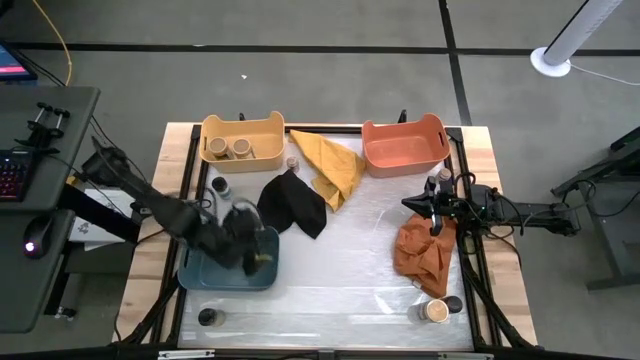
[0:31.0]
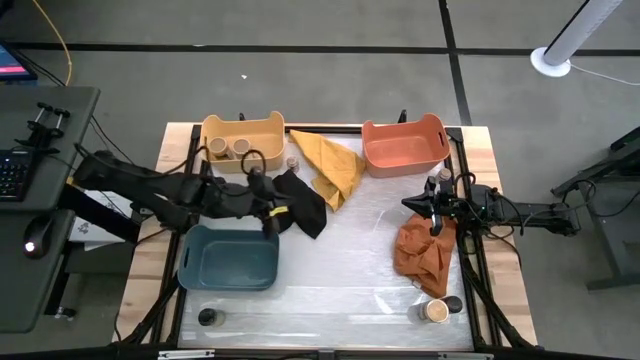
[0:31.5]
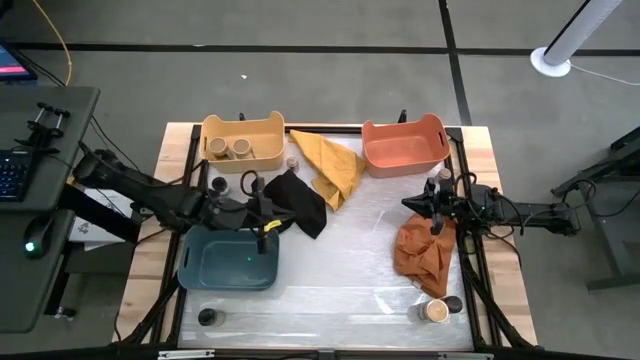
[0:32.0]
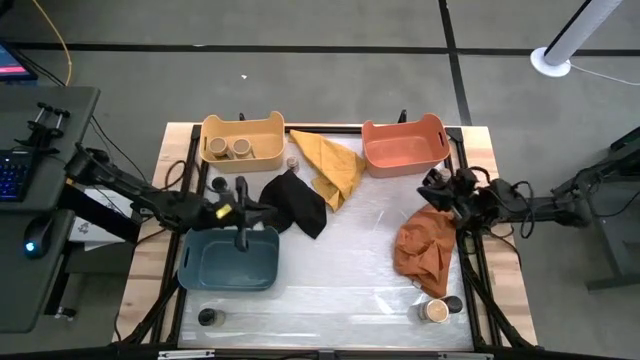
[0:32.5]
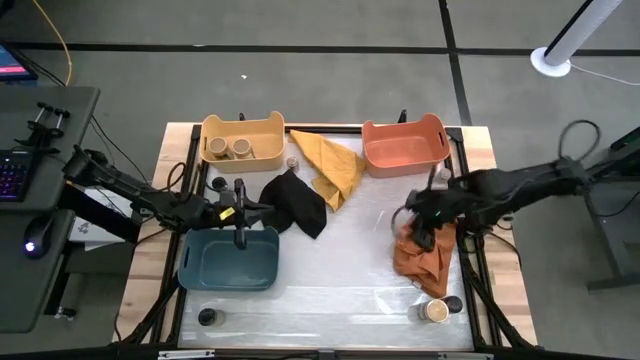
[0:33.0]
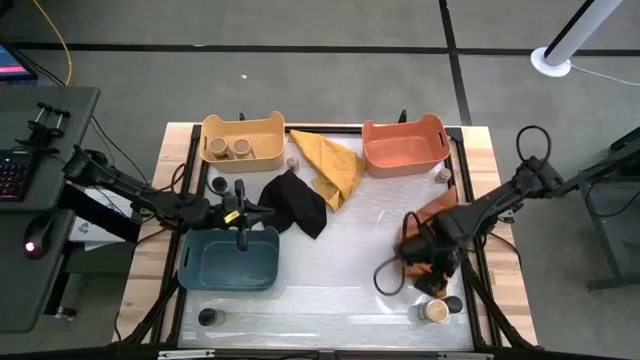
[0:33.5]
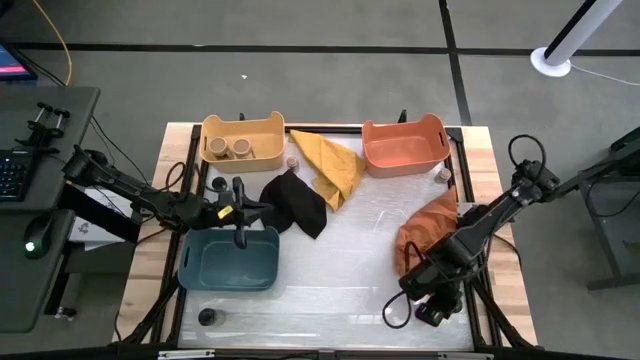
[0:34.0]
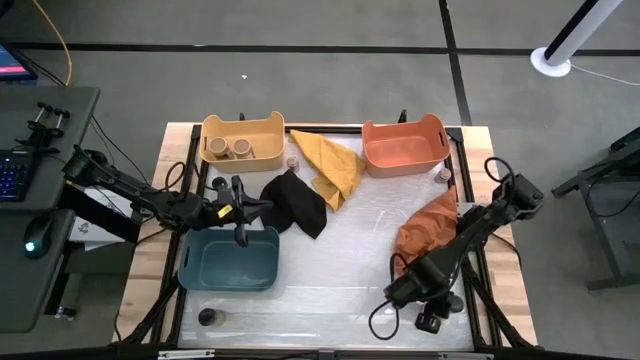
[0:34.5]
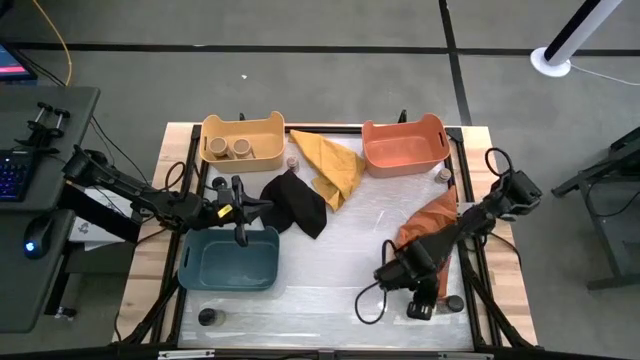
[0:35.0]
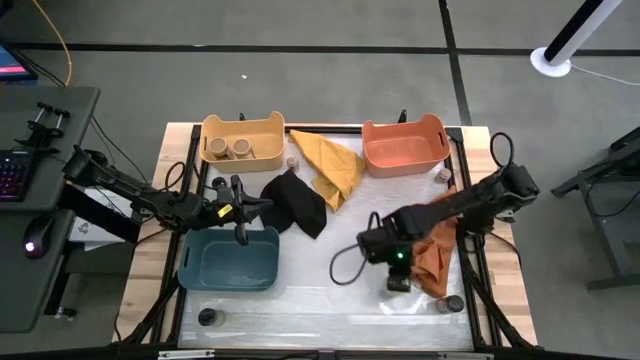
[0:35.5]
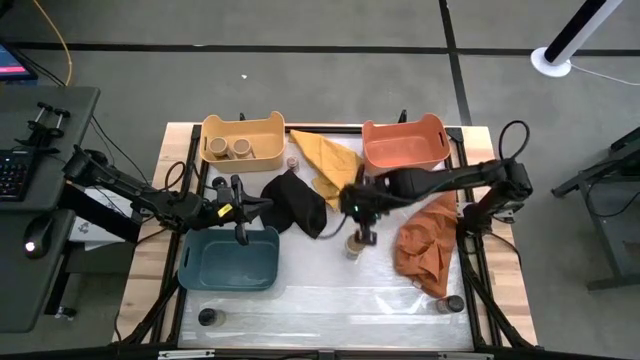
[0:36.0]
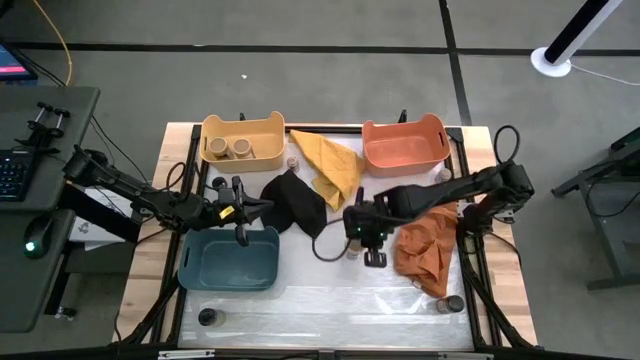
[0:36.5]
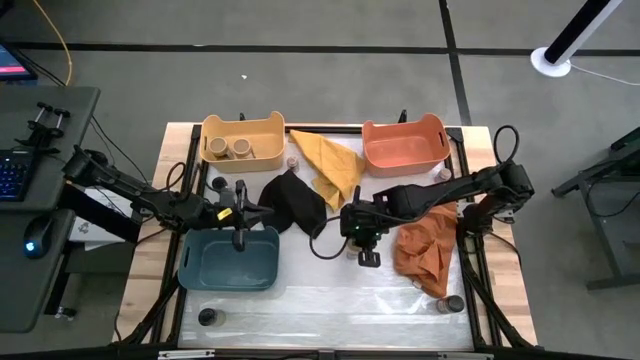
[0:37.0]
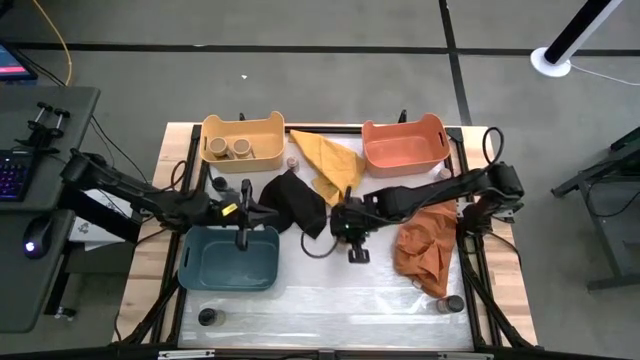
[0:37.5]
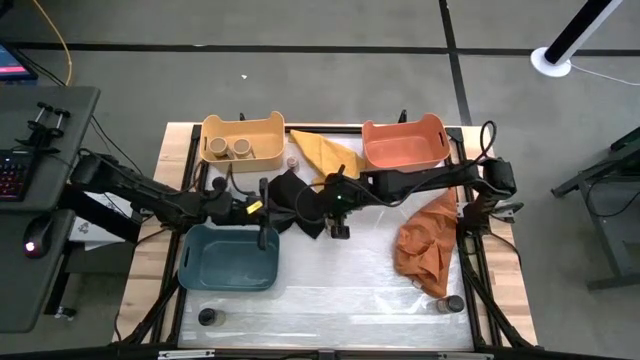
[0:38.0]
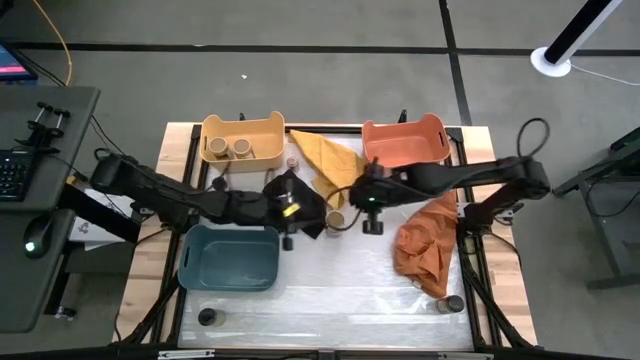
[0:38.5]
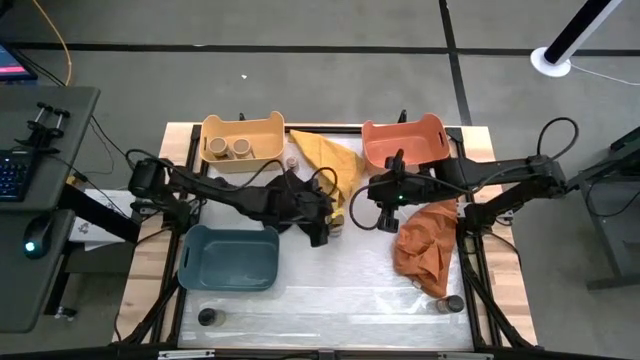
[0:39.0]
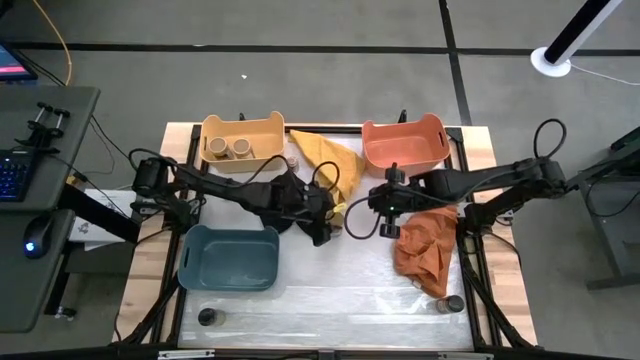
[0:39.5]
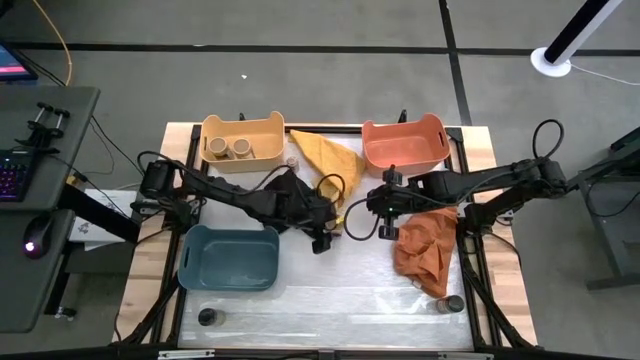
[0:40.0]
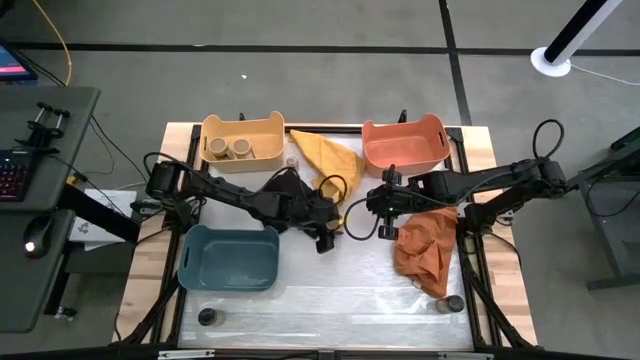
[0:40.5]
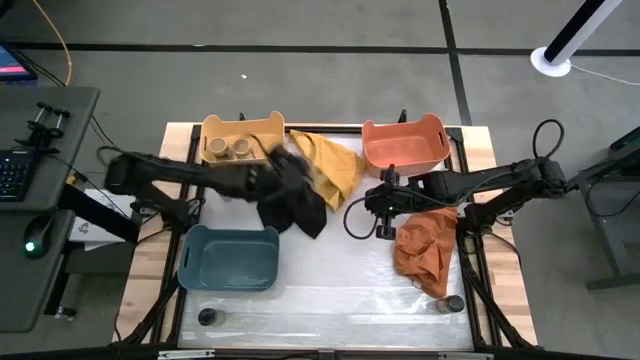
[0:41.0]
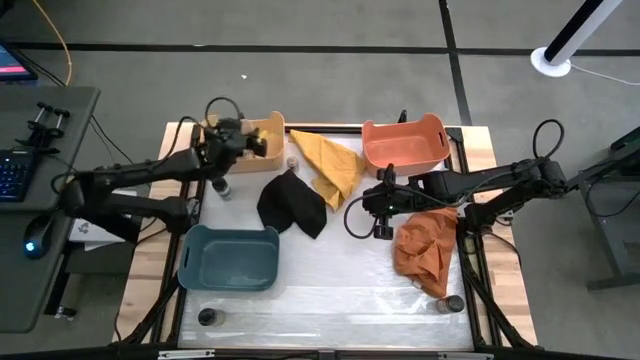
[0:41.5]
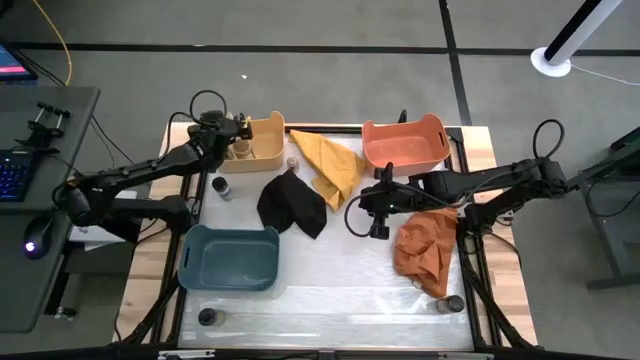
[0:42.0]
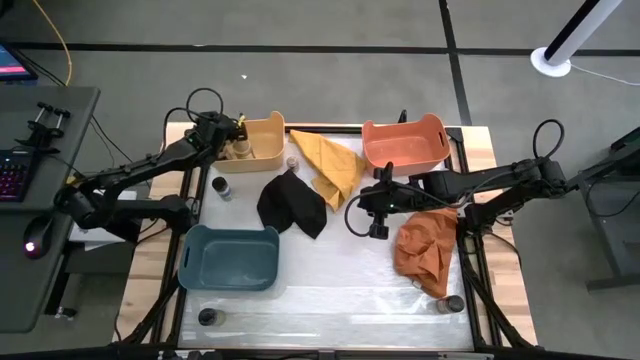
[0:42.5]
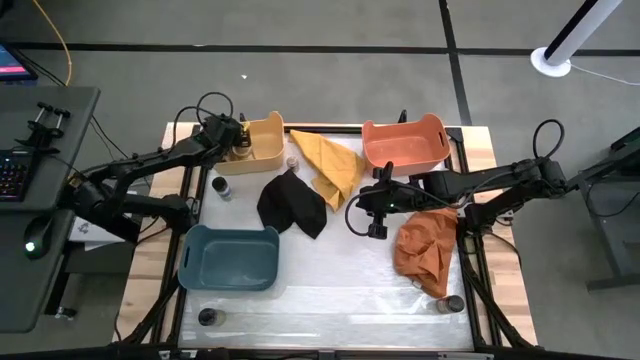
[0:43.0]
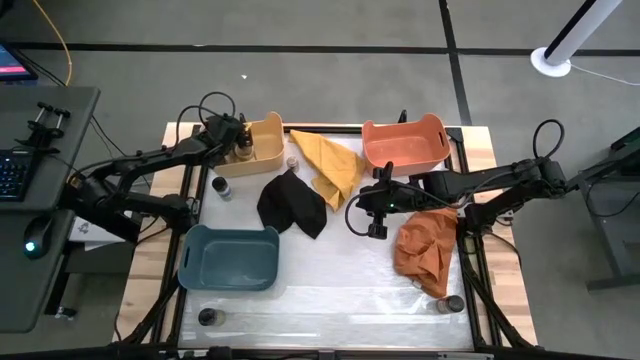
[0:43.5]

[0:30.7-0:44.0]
Task: Sort spices by type
Put the gold spice bottle into the bin

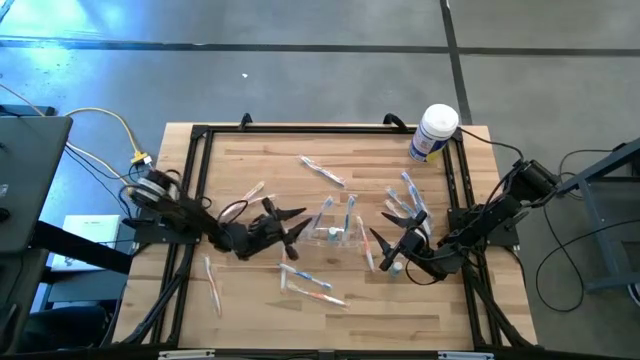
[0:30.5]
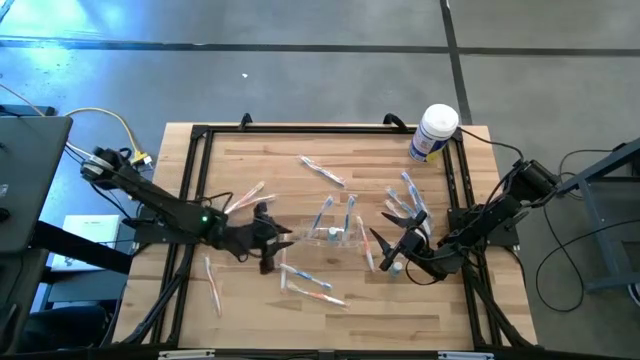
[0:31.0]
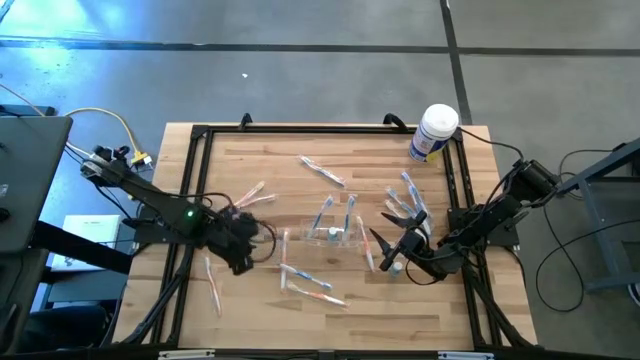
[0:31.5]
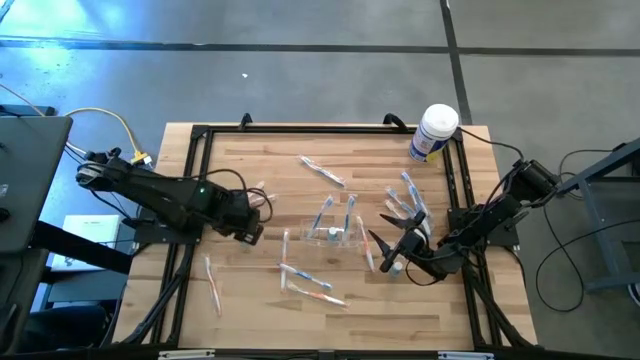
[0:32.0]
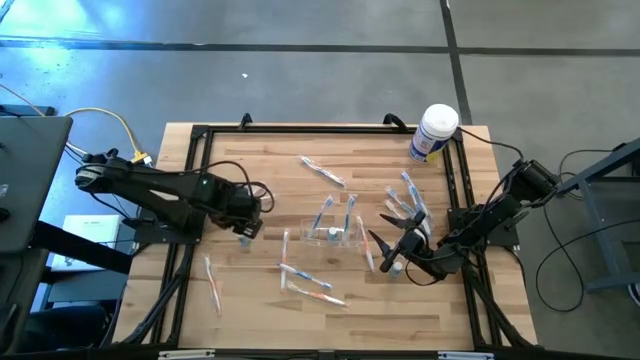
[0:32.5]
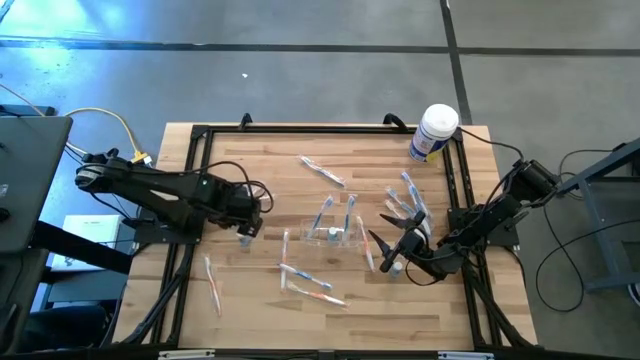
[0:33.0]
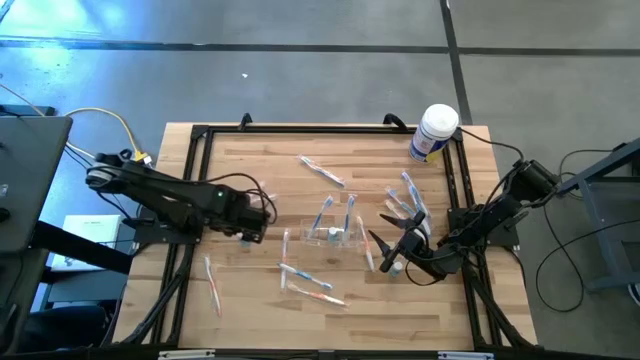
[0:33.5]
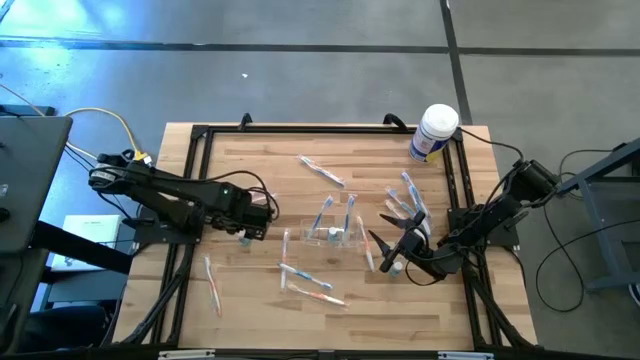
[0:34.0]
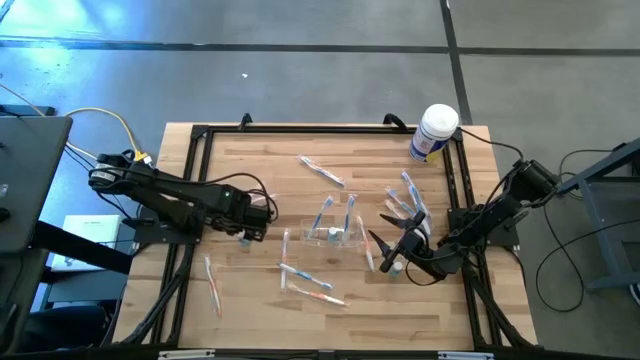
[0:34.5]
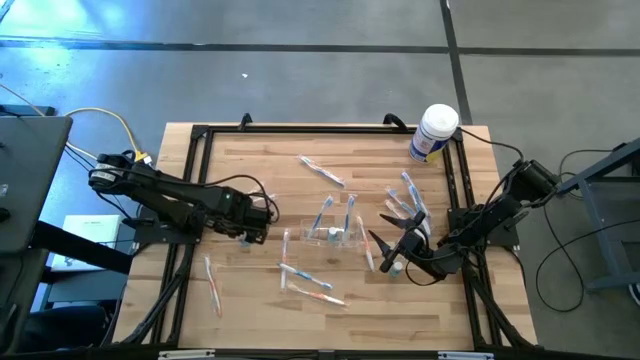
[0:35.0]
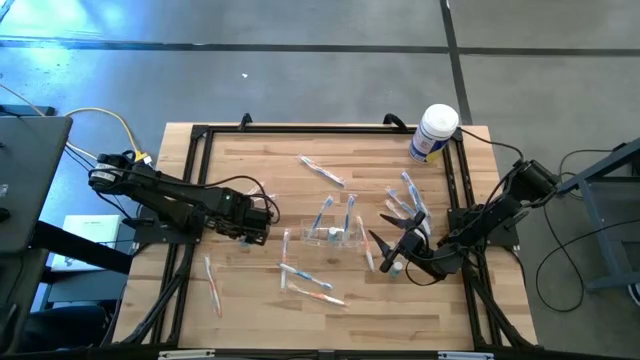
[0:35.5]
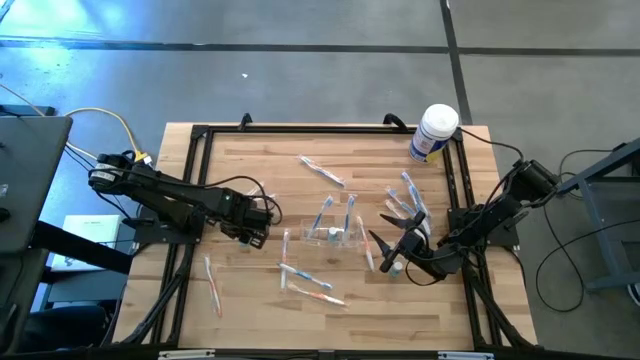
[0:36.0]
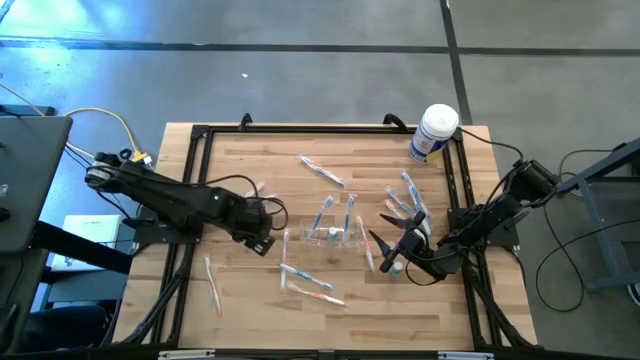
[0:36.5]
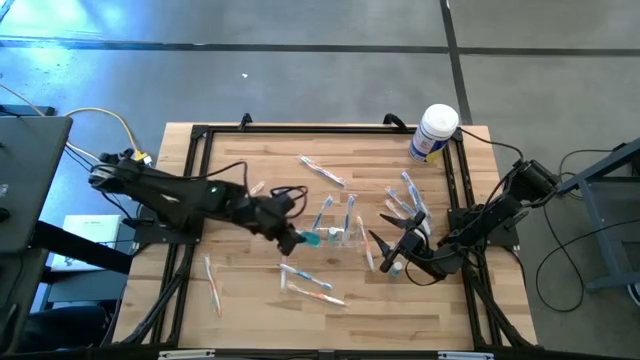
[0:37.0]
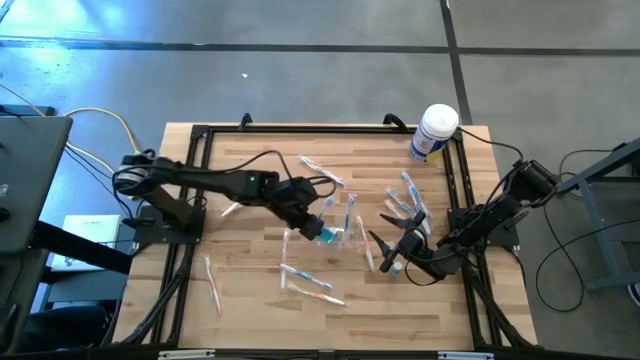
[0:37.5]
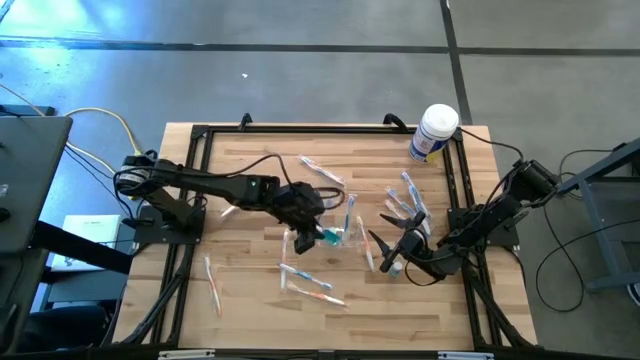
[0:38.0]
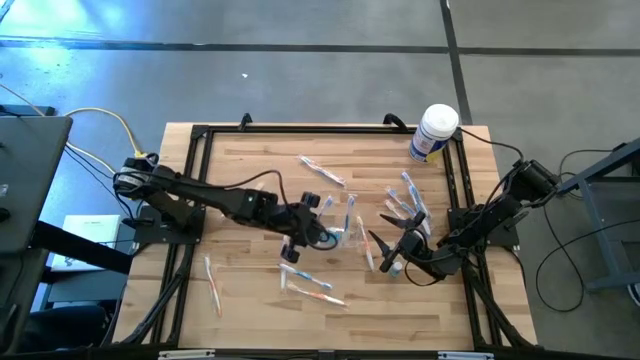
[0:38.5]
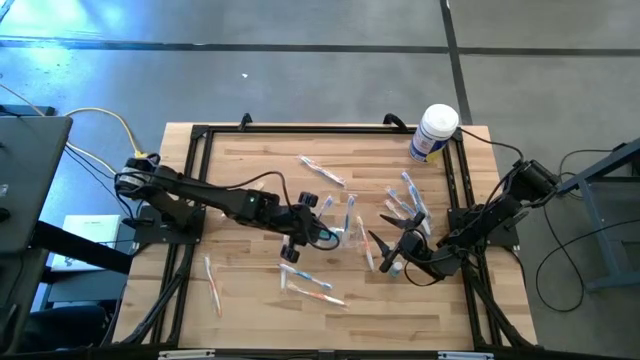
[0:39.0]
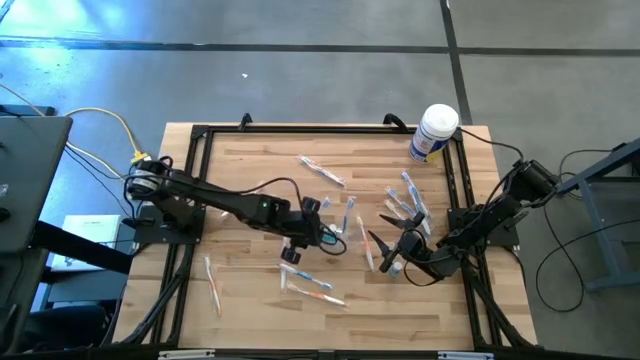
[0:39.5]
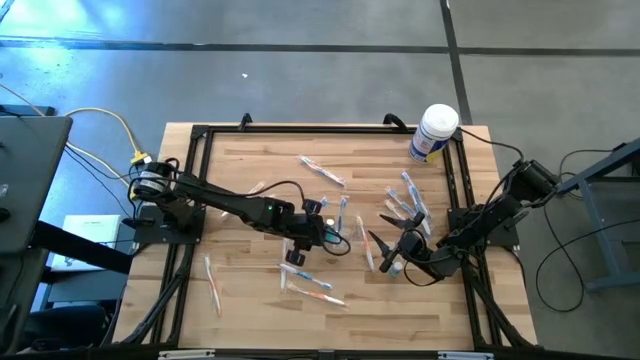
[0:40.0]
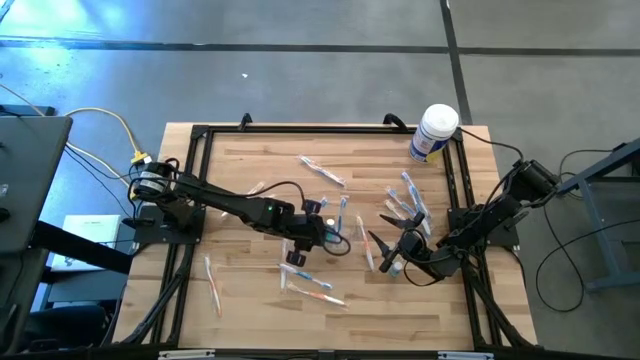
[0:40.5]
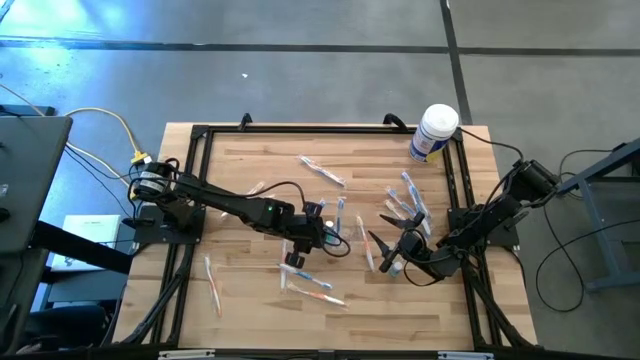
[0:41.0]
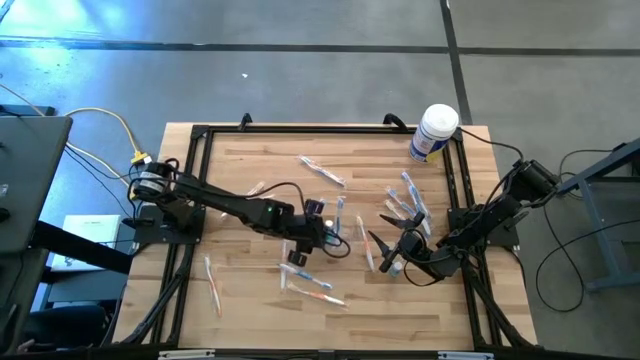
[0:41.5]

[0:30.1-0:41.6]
Task: Pick & Place toothbrushing station
Put the blue mouthwash bottle into the transparent organizer
